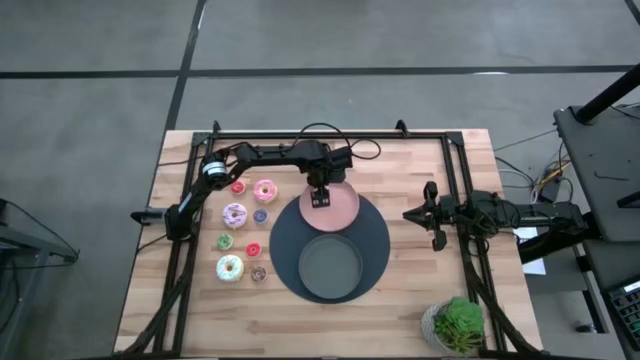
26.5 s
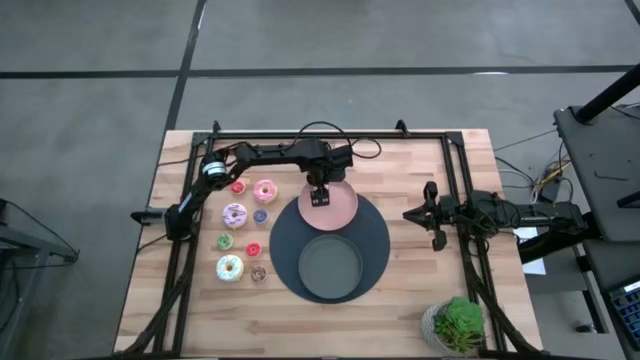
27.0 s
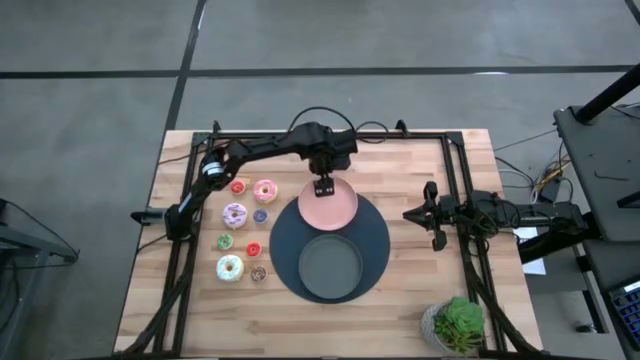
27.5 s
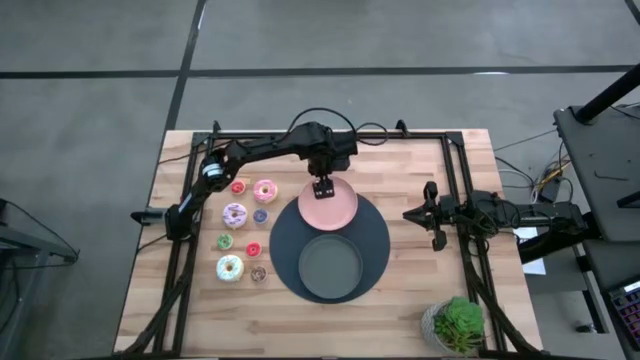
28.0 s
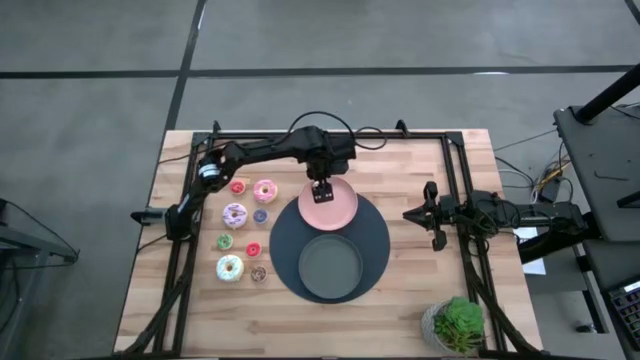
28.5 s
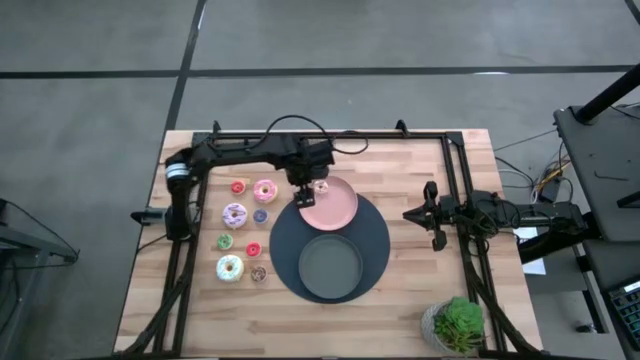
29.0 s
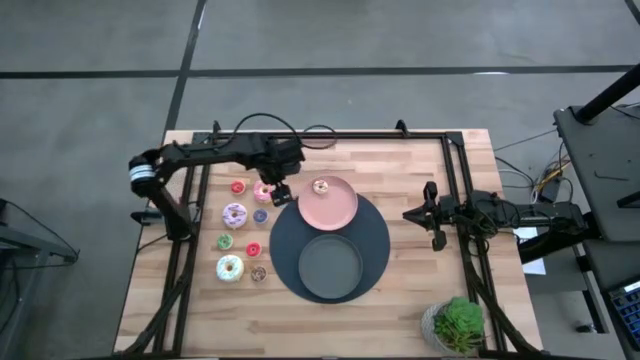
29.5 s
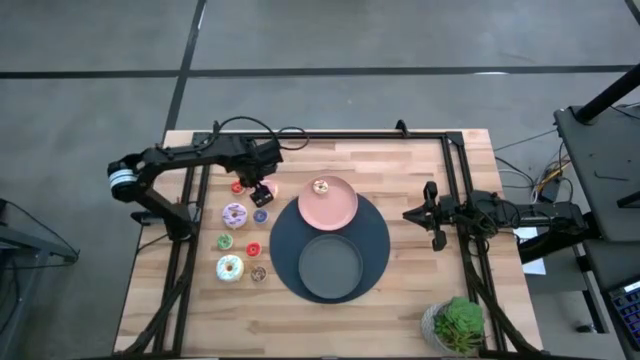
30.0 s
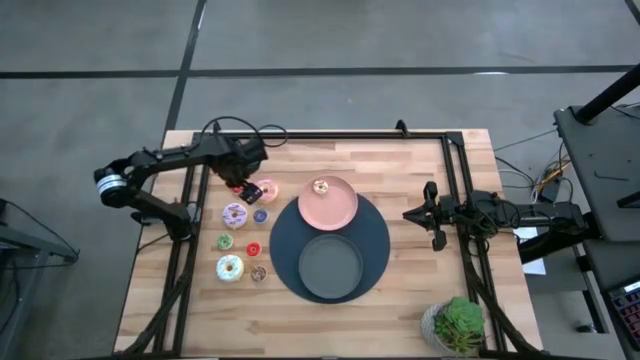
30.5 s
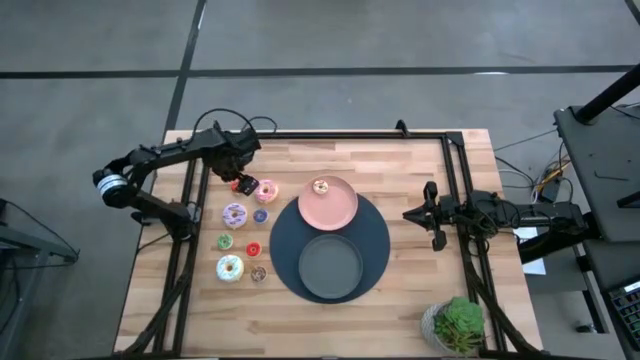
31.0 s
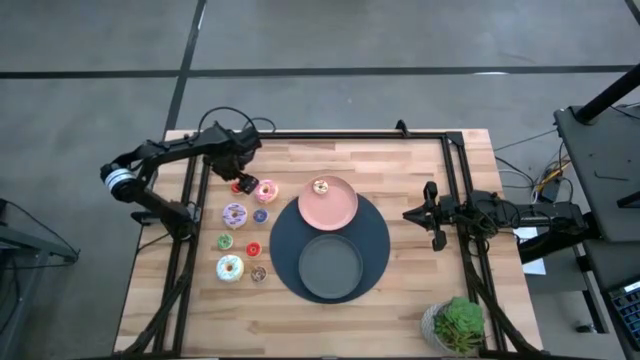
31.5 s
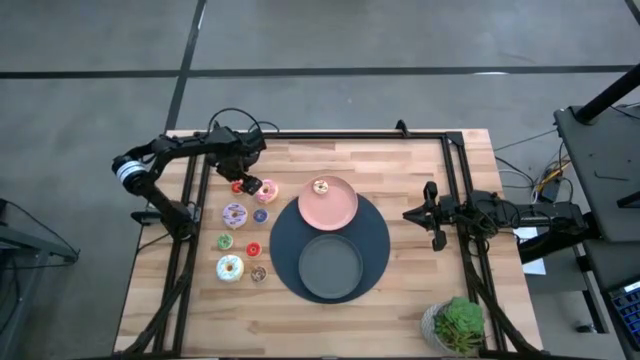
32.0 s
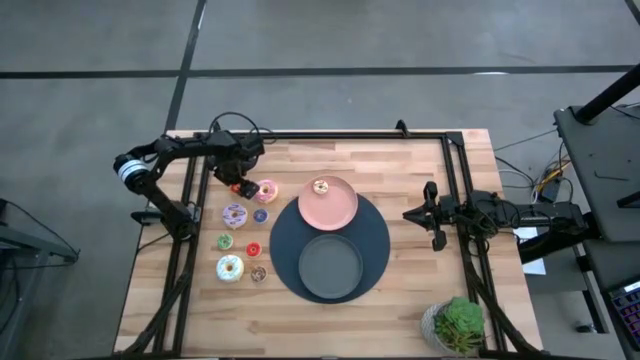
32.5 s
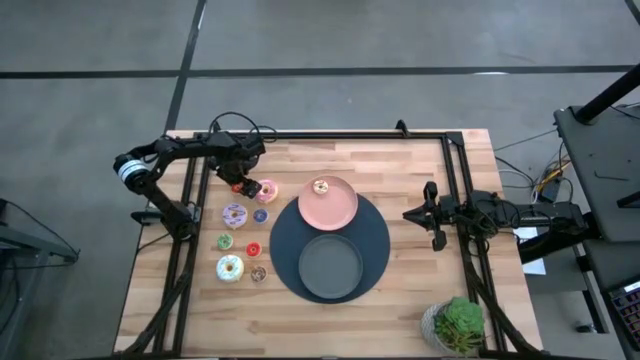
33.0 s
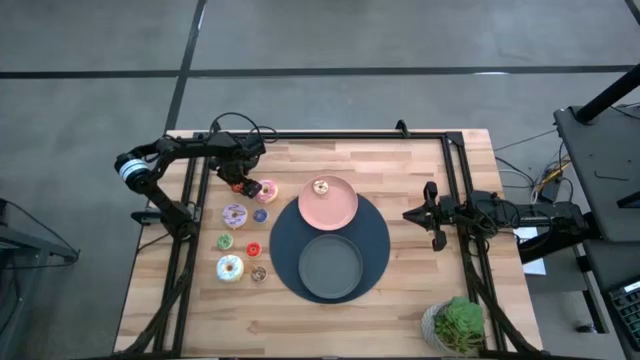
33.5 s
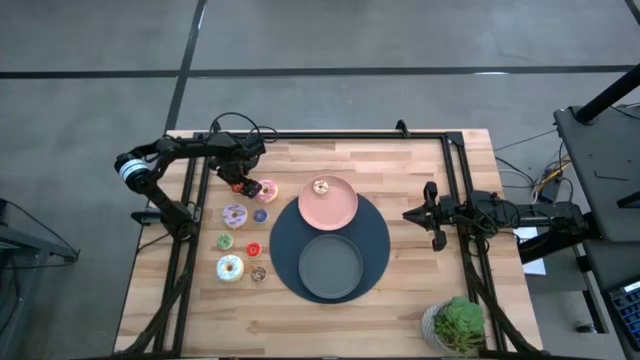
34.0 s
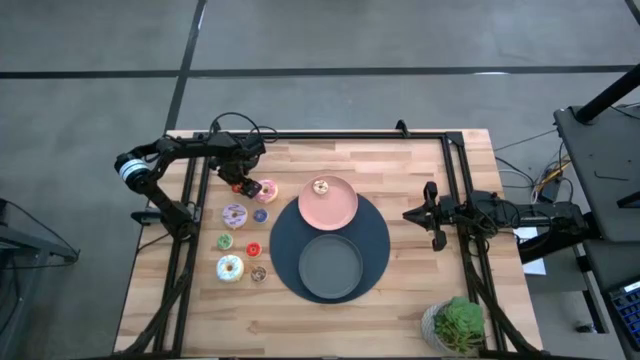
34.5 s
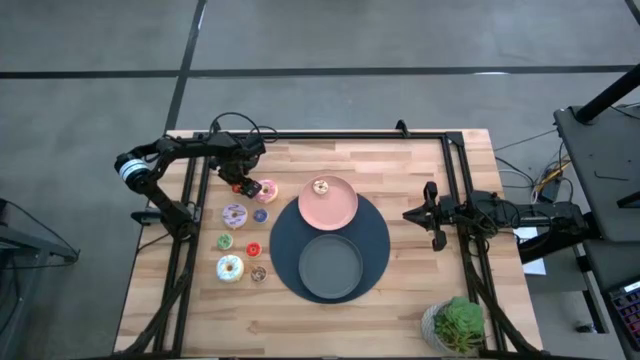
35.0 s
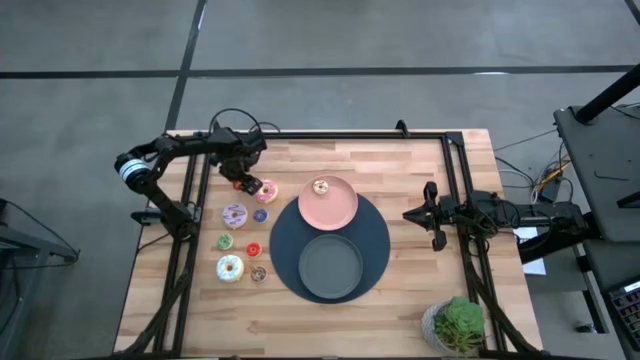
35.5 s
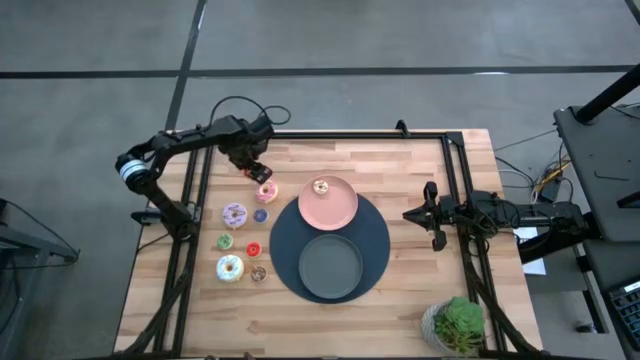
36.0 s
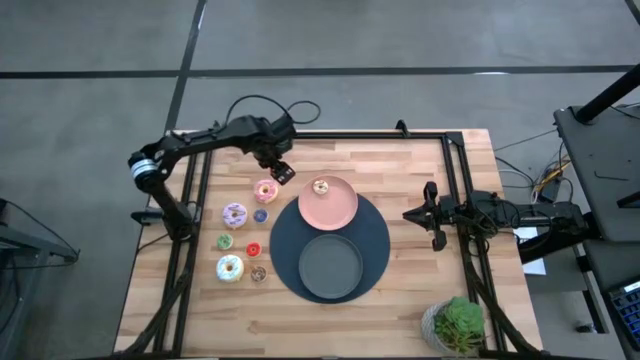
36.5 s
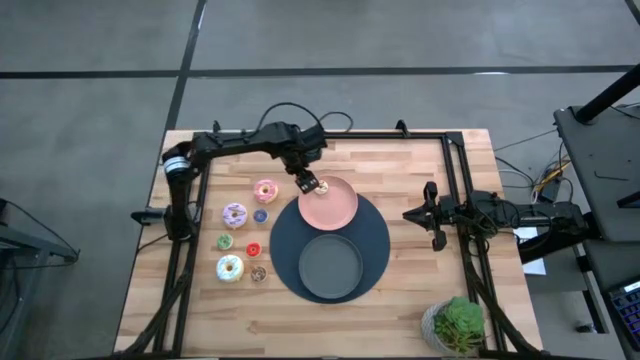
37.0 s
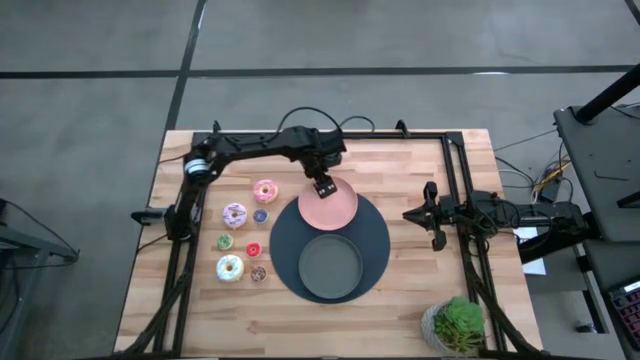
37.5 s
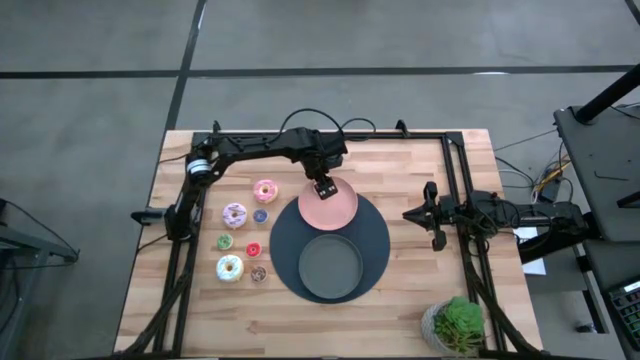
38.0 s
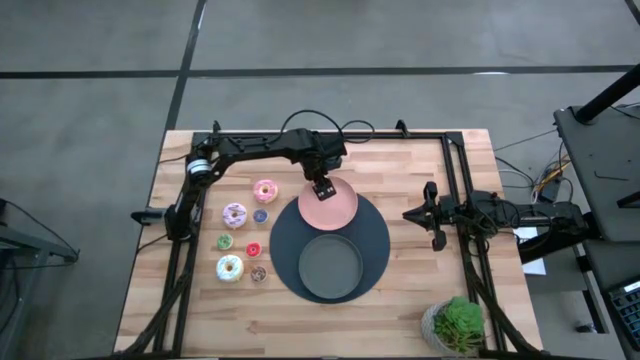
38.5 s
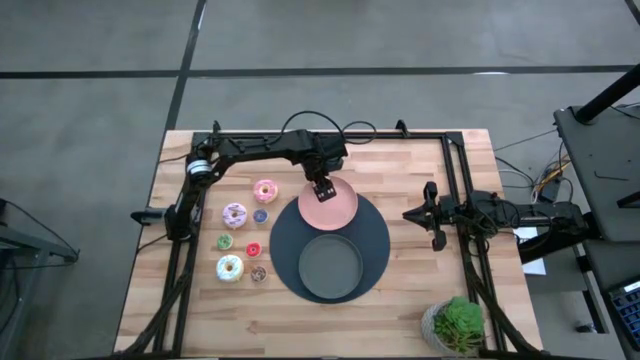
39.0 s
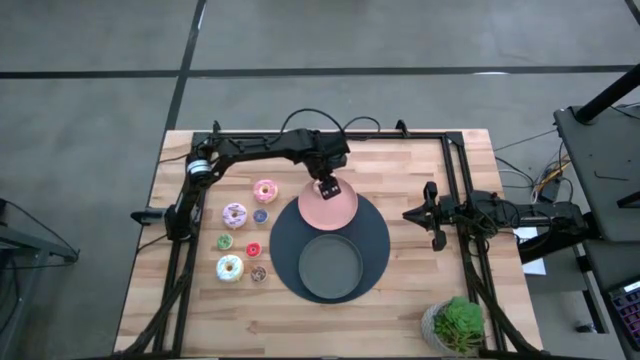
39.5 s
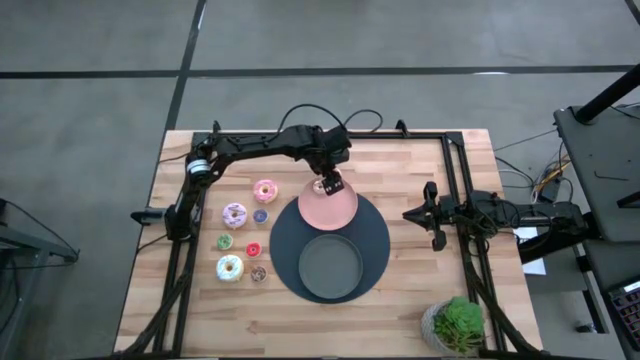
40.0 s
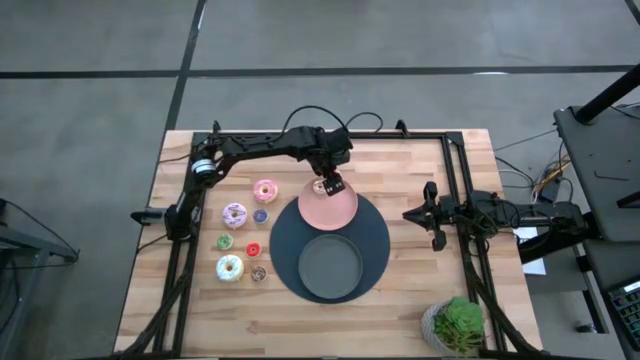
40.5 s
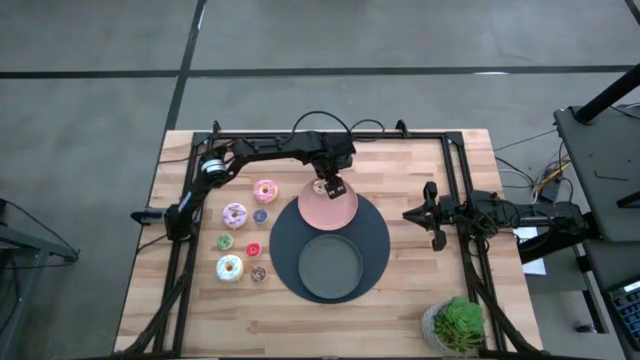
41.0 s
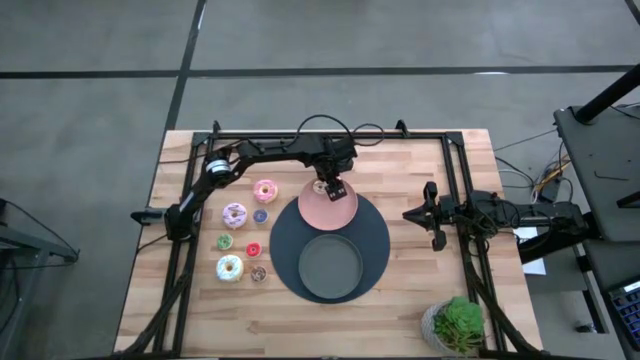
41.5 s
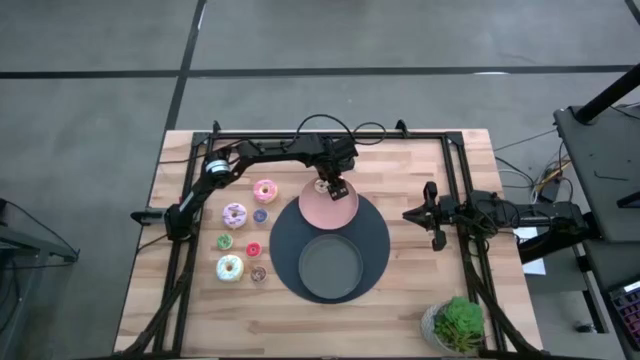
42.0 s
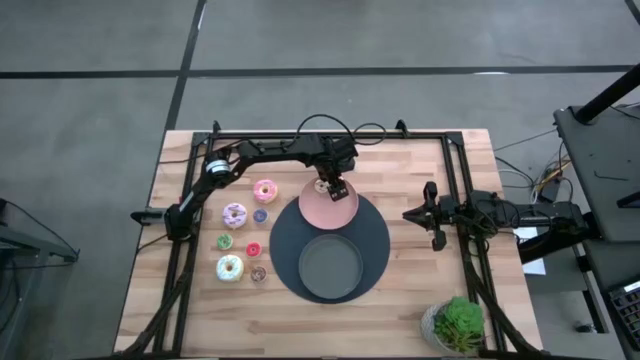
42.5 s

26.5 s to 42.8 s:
Task: Pick & Place donuts
Put the small orange donut on the pink plate
